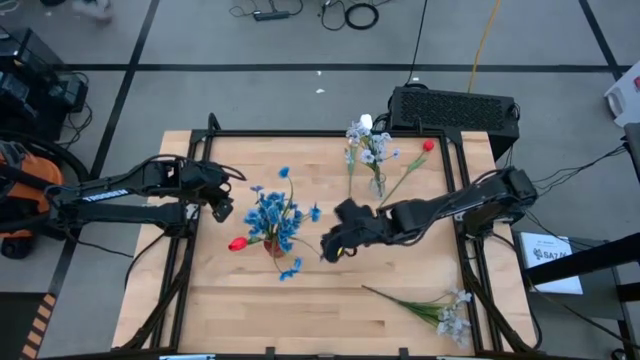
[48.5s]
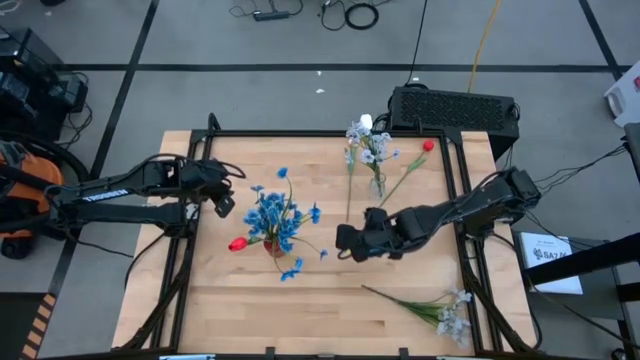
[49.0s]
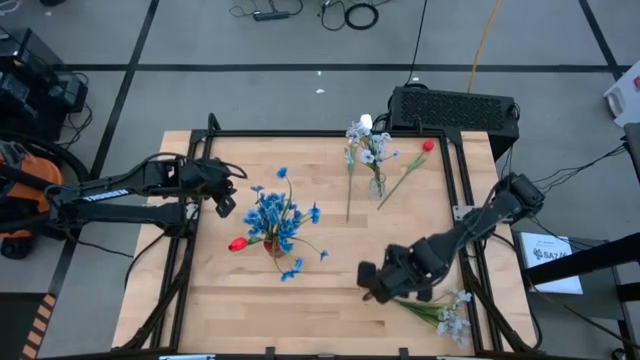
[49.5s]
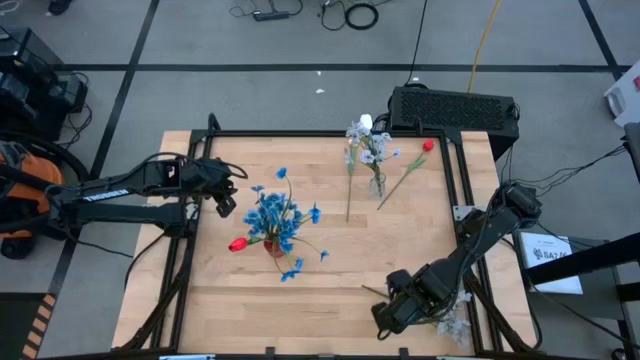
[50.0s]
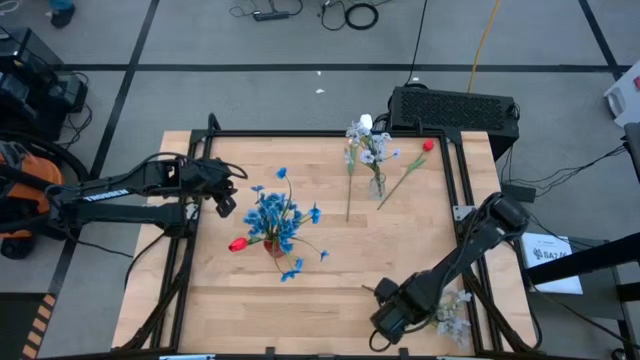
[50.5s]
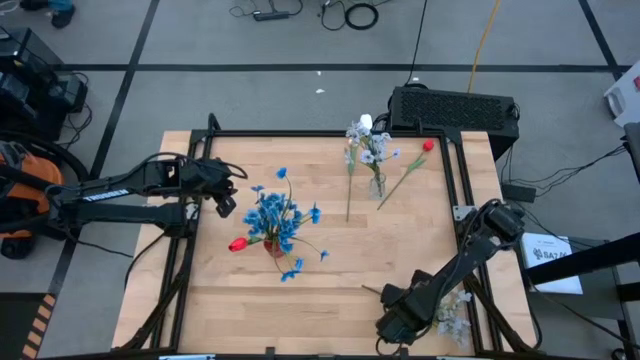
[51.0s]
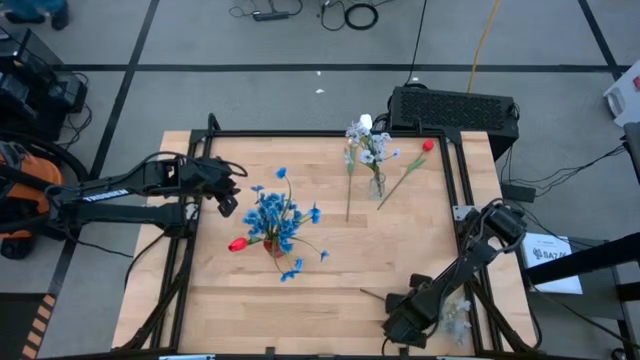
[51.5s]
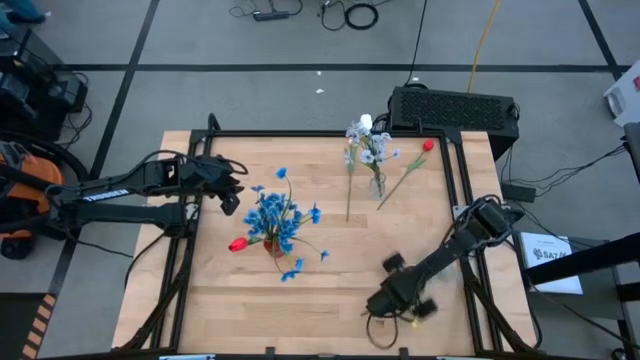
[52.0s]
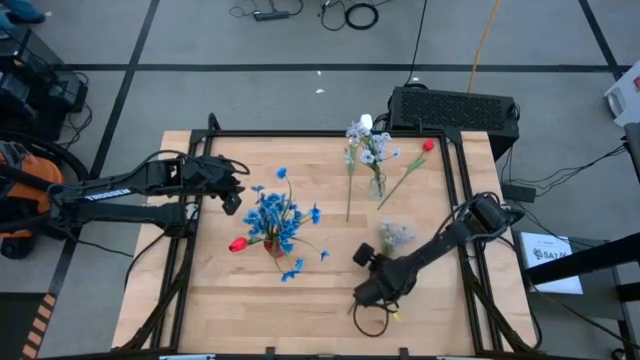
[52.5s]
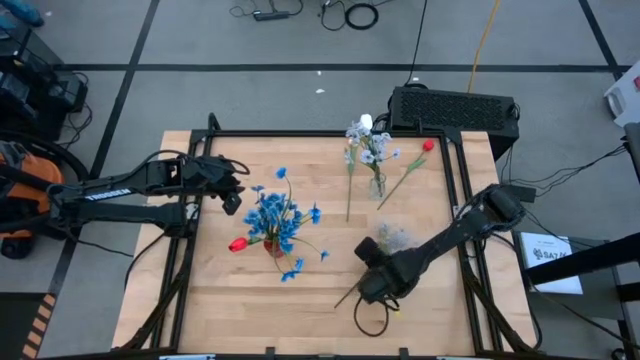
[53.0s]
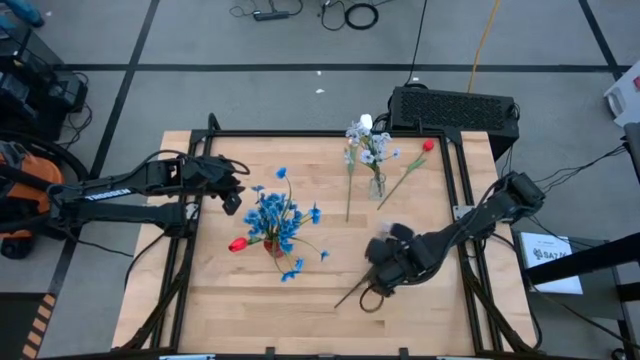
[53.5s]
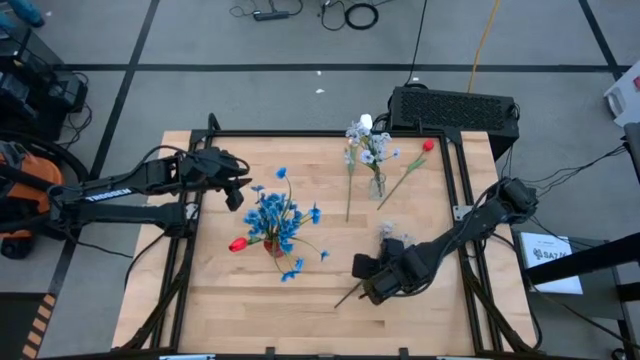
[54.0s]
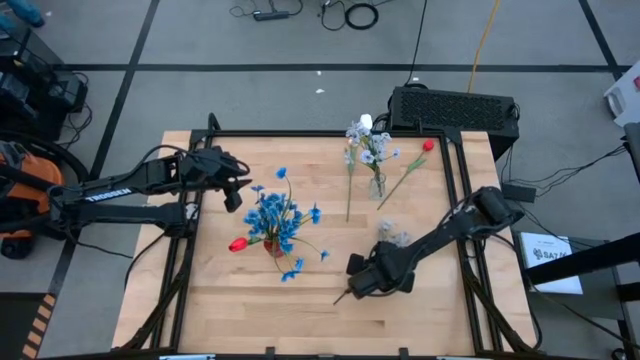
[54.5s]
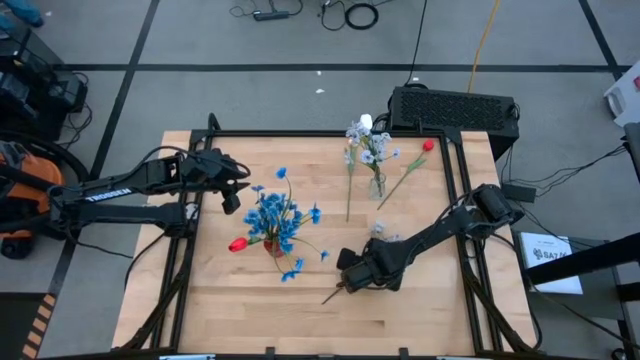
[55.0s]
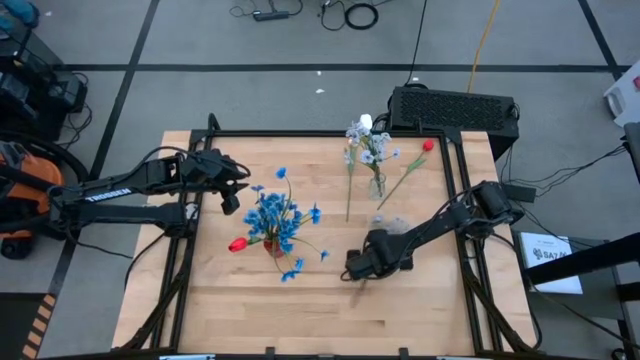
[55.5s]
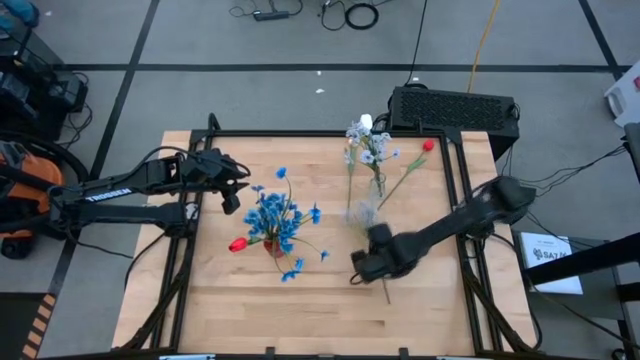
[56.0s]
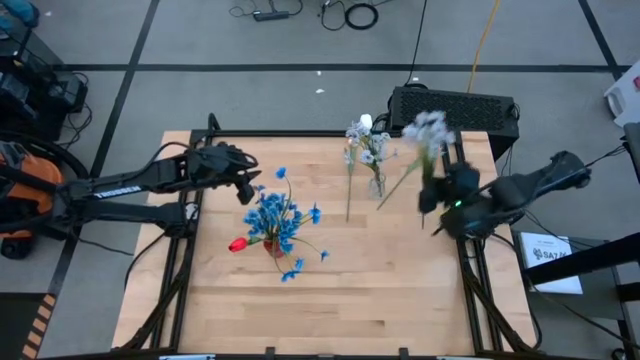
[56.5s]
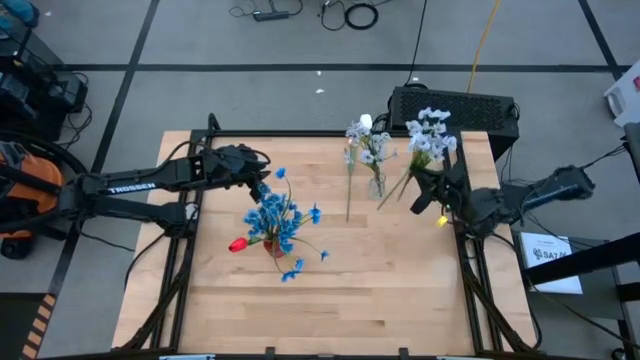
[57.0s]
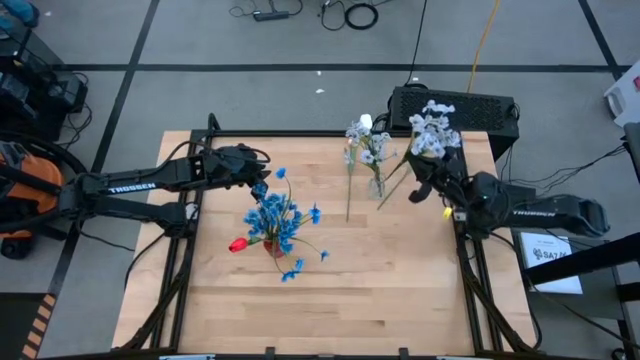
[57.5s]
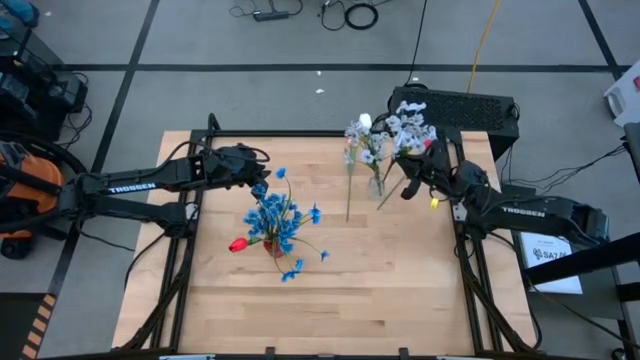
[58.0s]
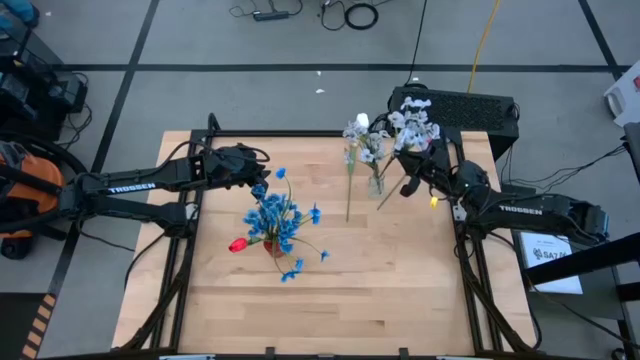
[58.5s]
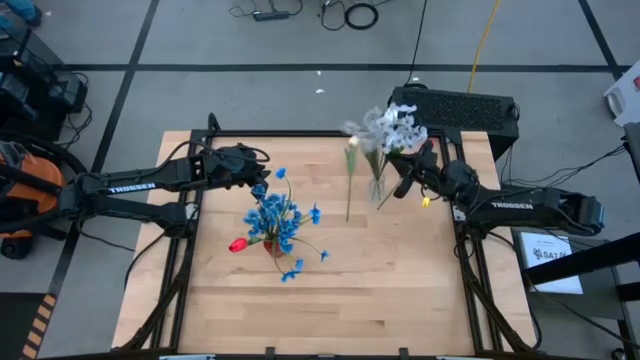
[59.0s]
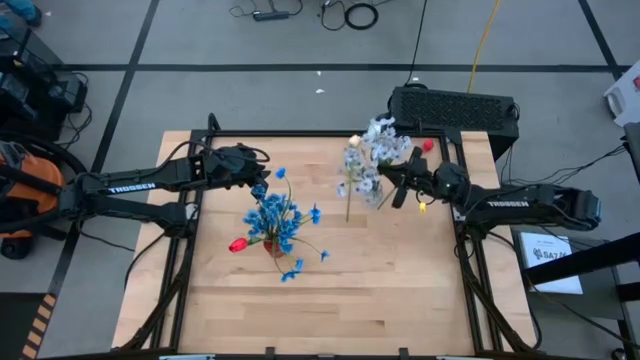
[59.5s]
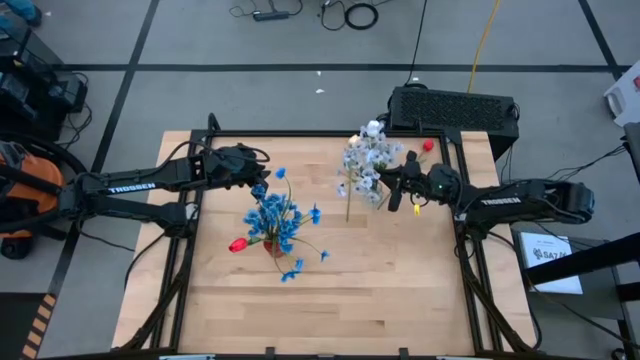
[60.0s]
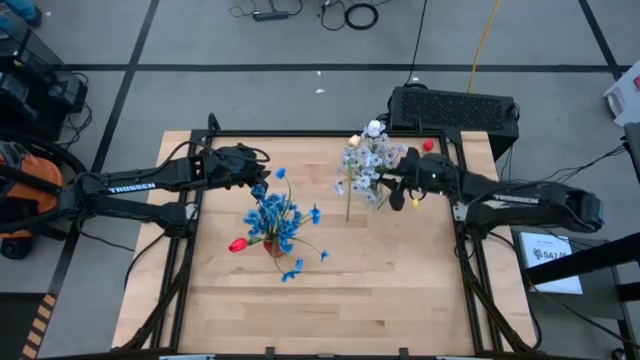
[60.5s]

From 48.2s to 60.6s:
Task: Sort flowers into vase by color
Put the white flowers into the transparent vase

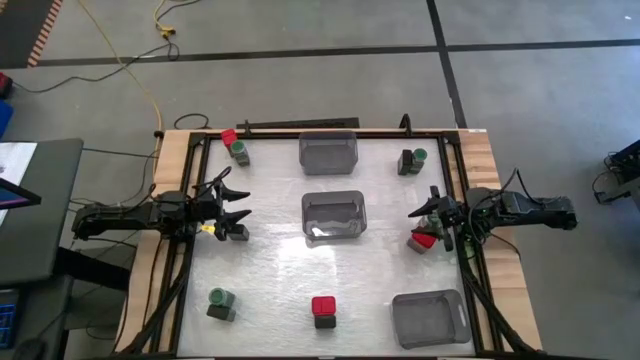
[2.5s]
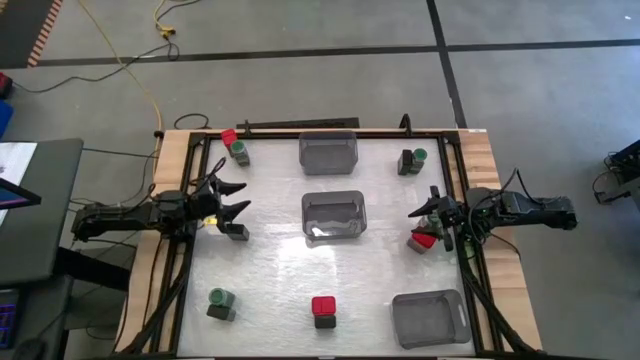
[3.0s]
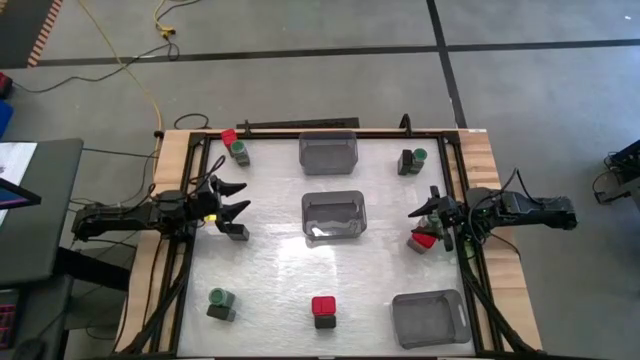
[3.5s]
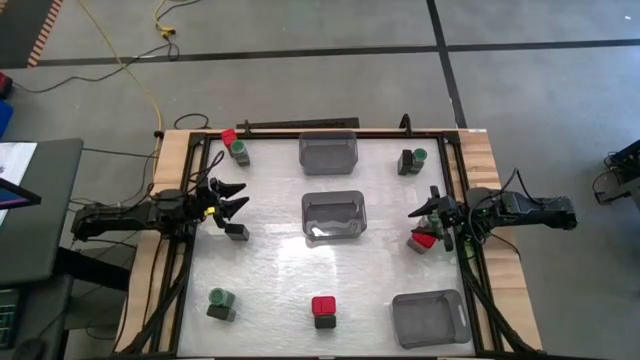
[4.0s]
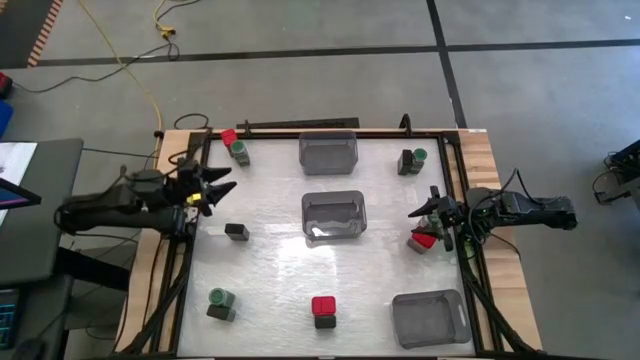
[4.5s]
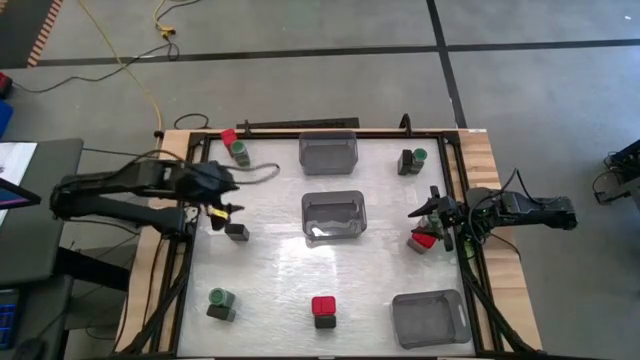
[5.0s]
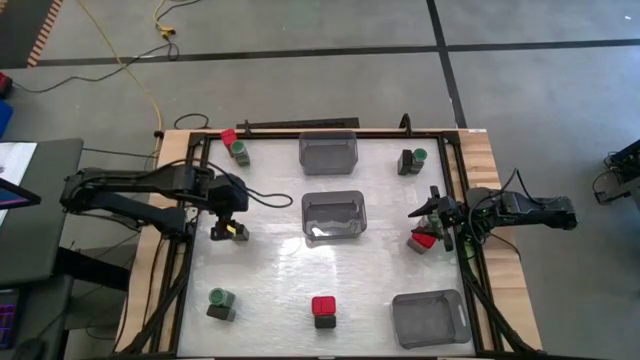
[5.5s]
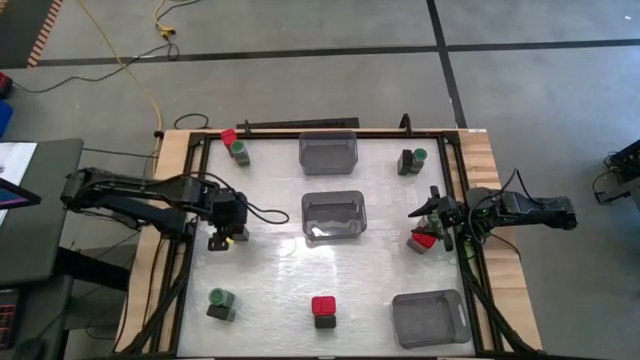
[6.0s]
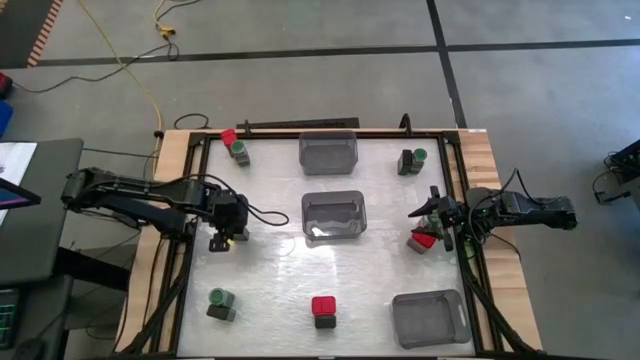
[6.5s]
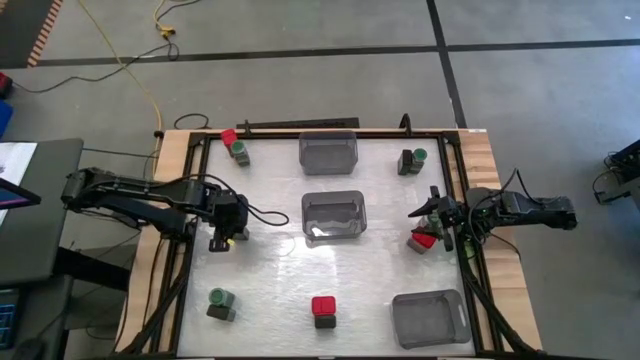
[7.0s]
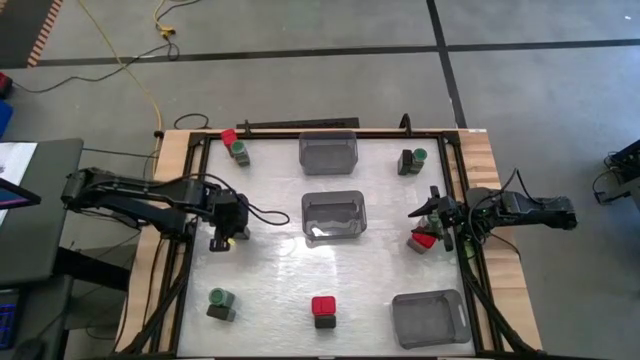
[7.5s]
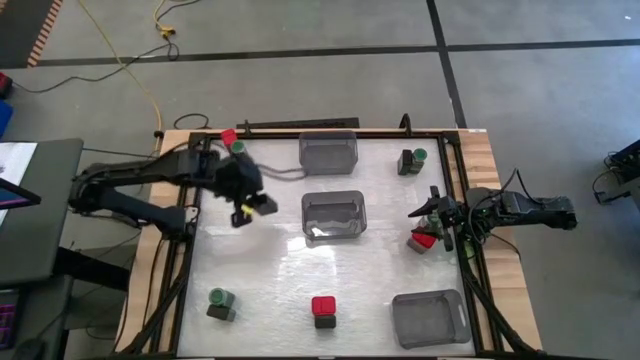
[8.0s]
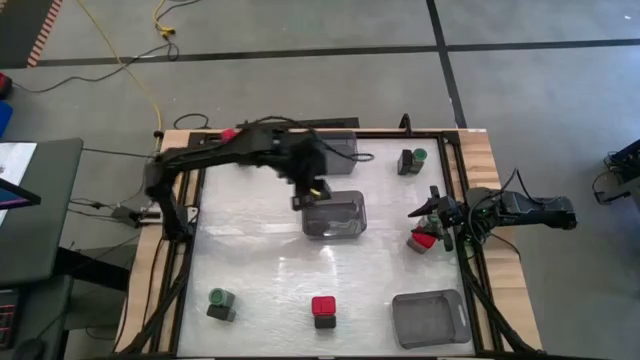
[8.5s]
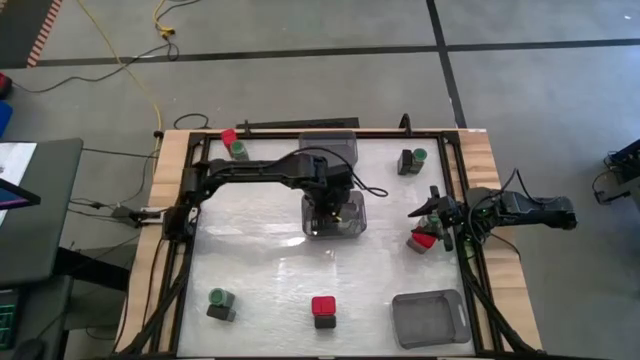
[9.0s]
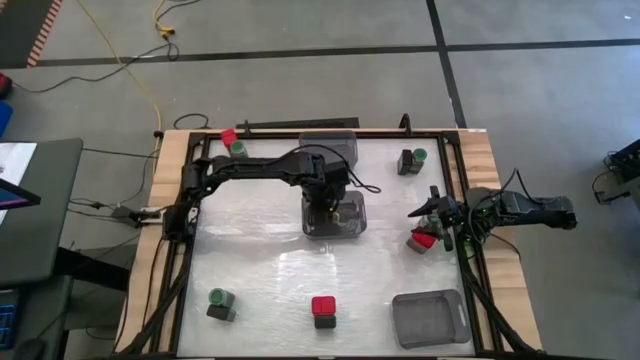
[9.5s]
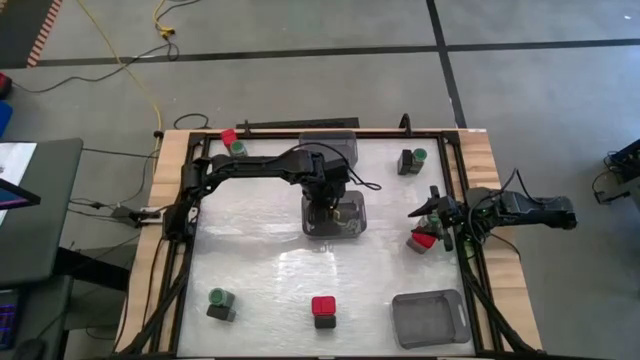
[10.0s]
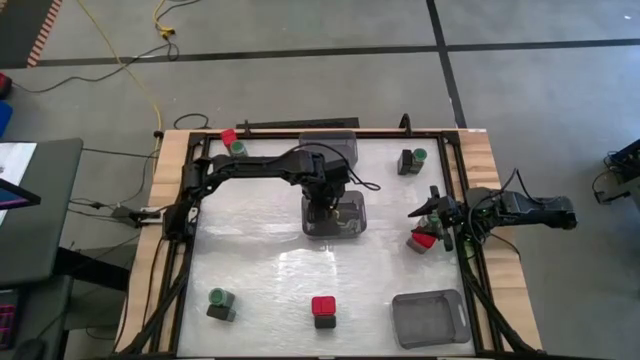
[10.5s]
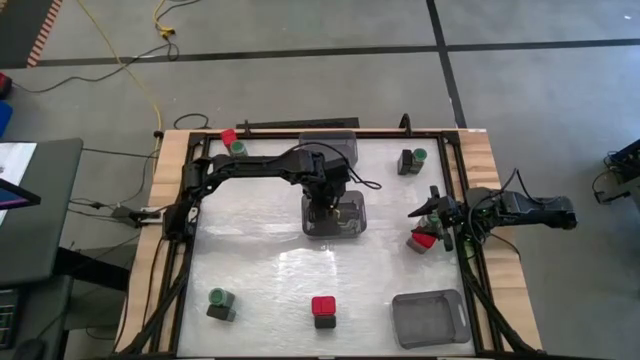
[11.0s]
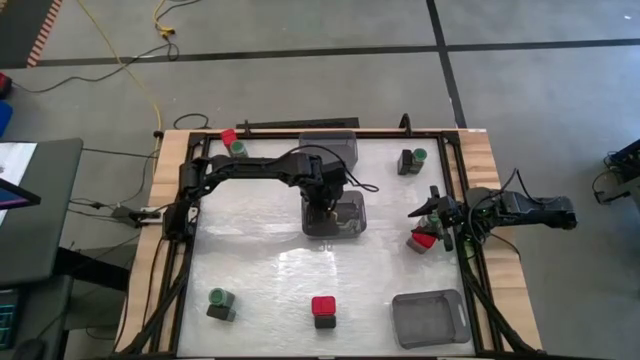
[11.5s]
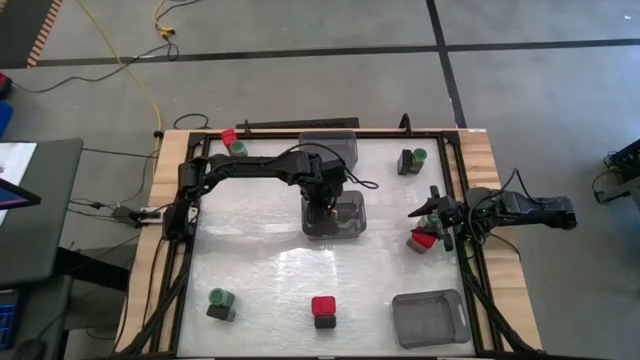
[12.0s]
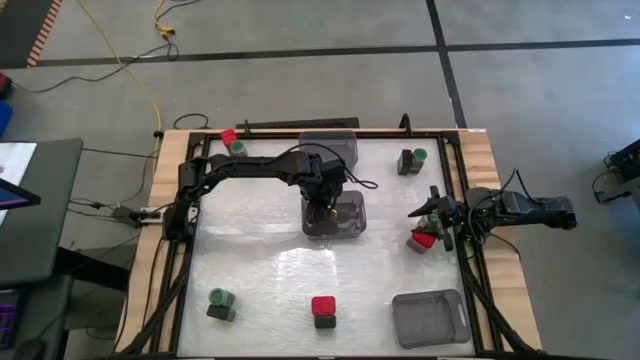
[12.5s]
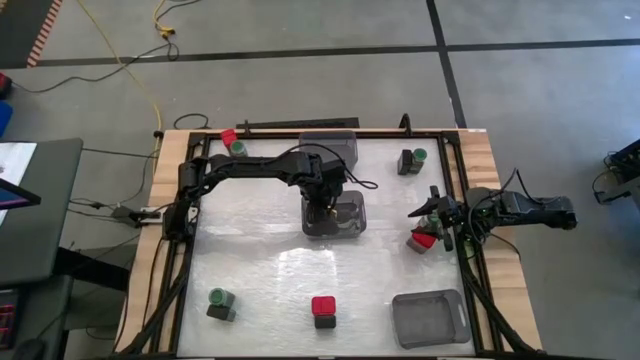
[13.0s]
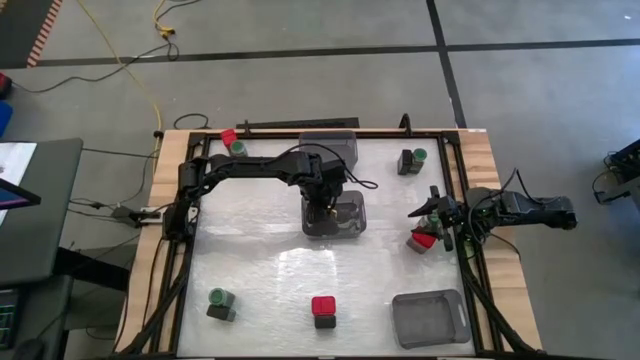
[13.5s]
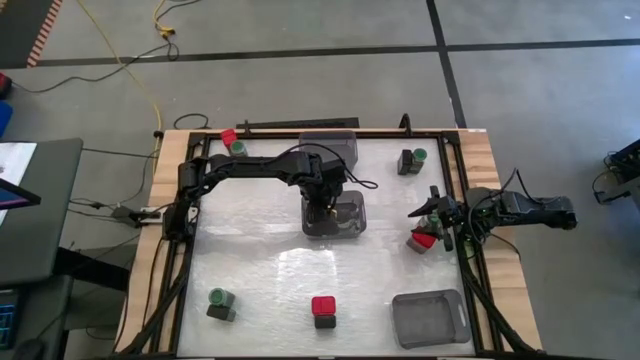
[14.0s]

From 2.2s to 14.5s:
Task: Sort spices by type
Put the black seasoning can into the middle left black bin
